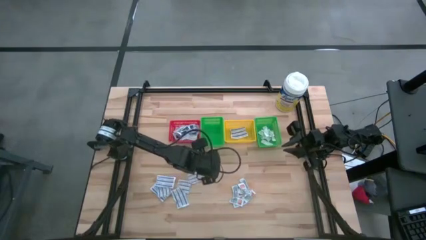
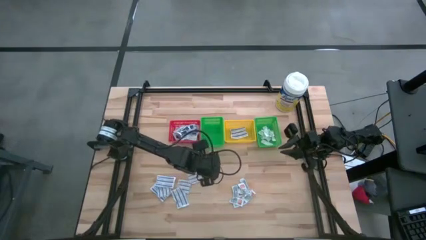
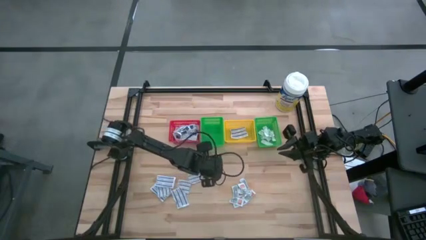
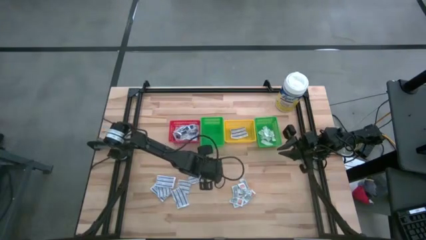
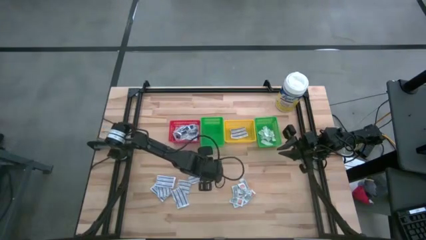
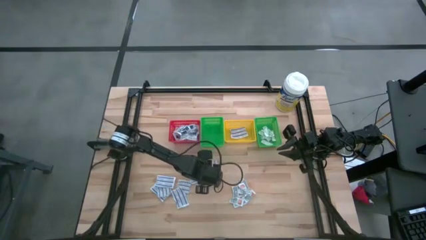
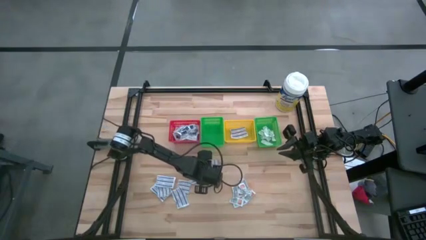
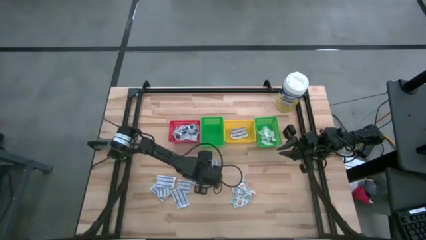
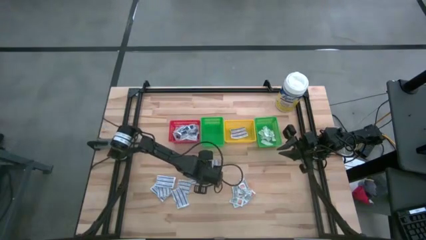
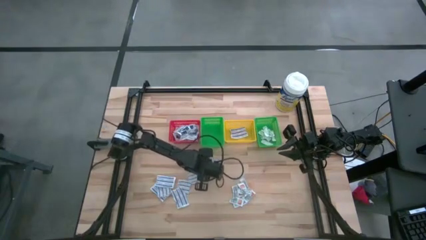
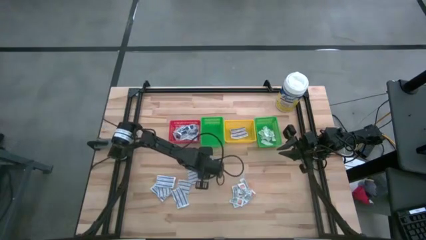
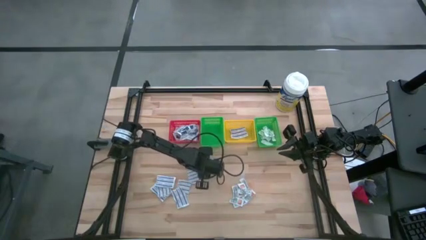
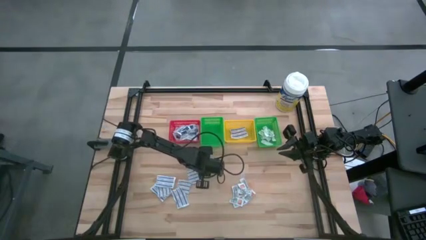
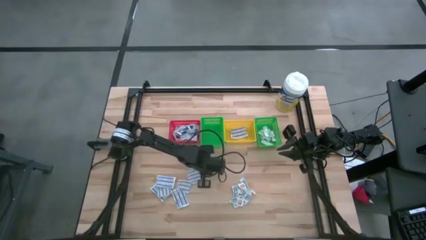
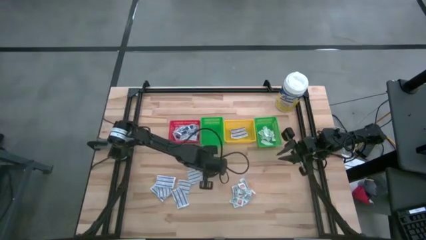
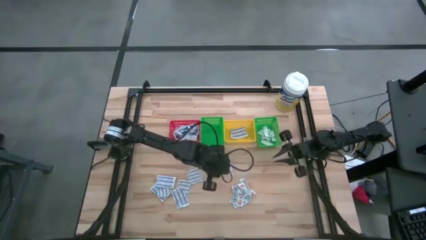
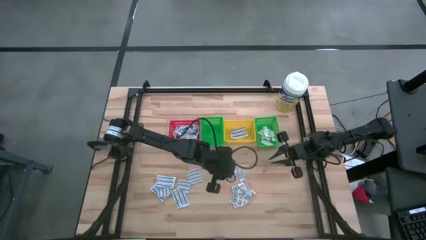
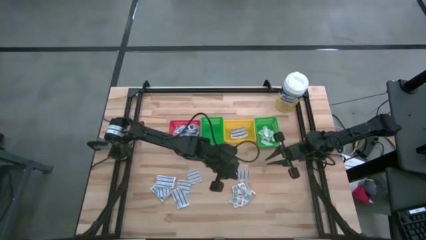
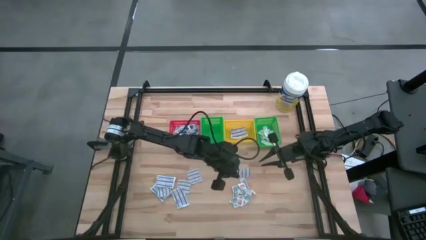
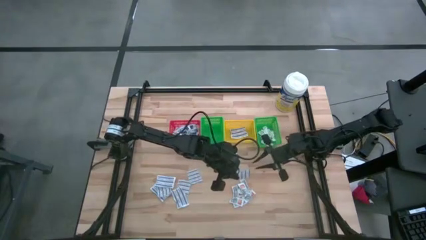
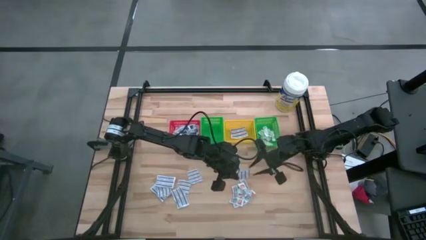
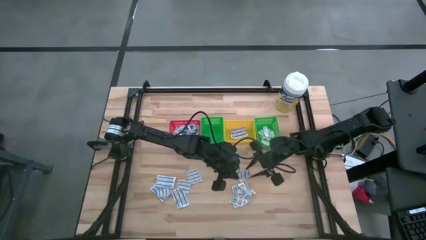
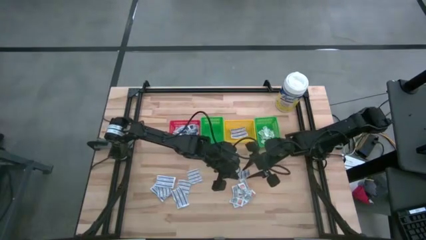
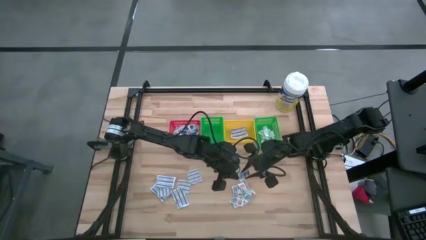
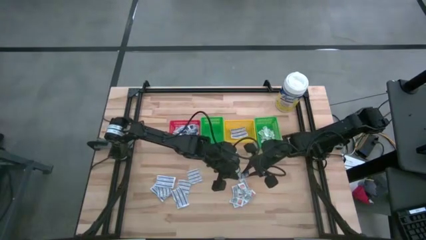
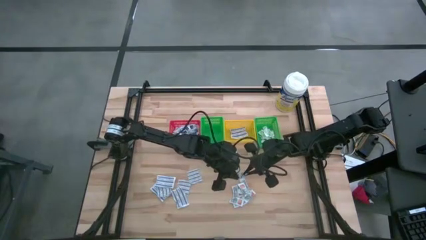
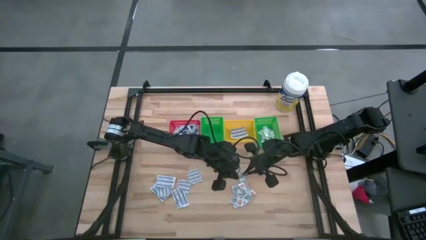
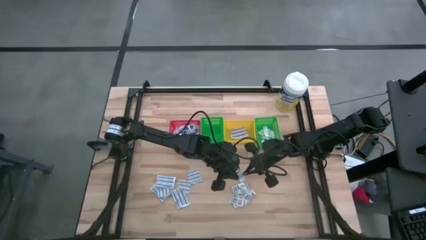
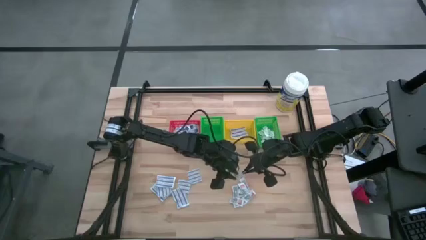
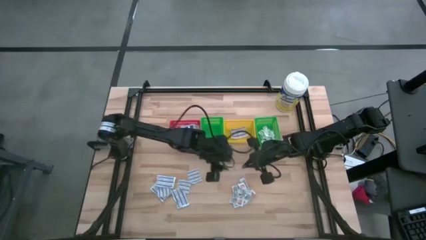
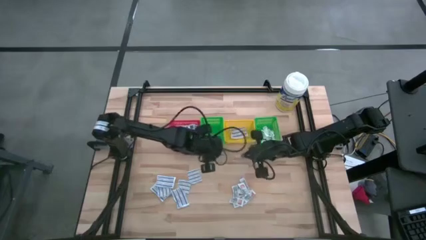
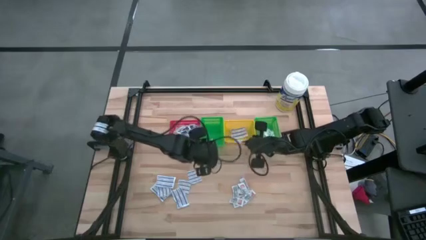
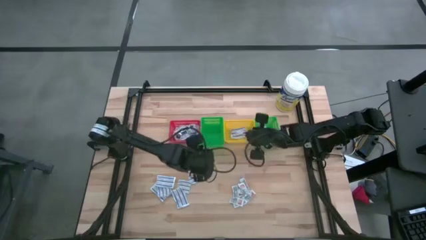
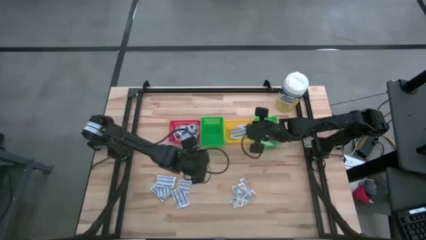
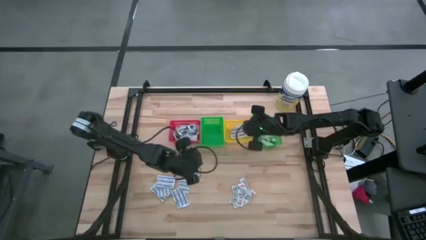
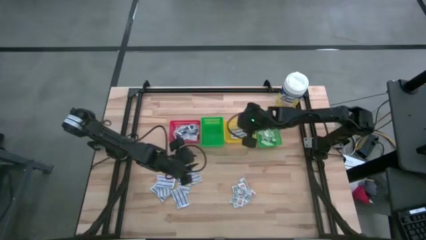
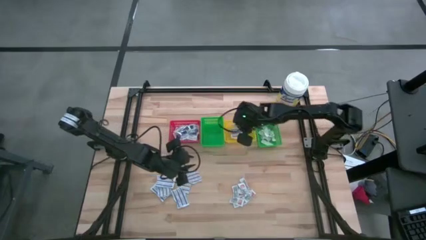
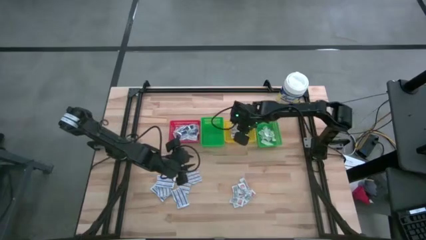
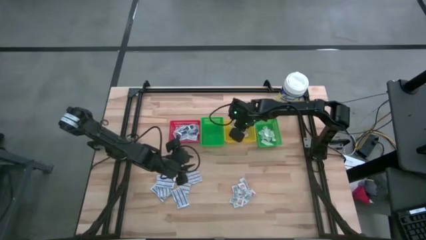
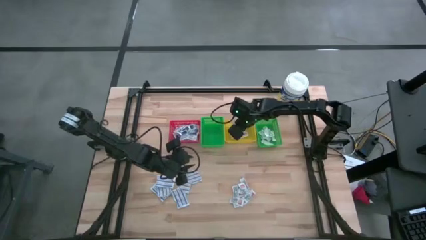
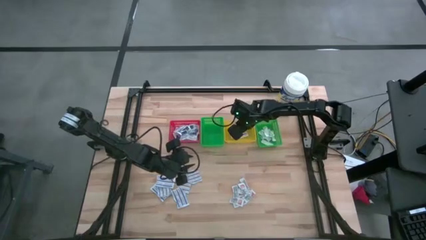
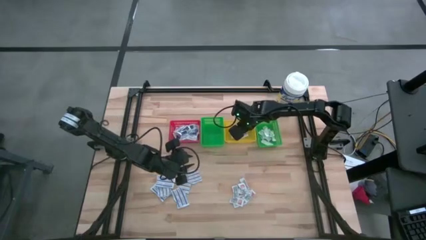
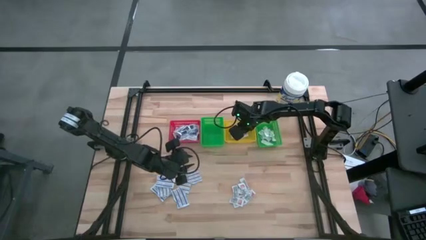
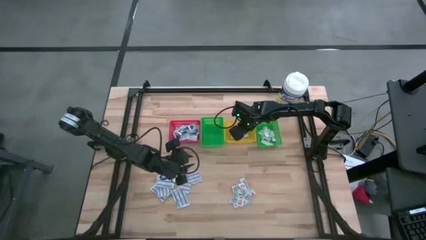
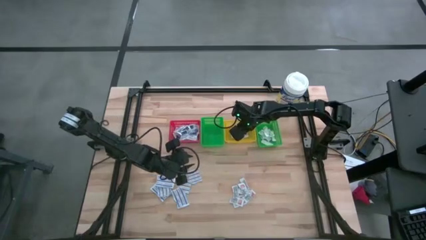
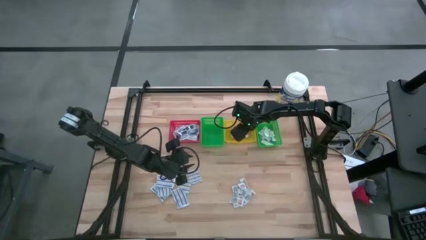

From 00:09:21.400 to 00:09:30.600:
Task: Pick & Place First Aid Supplies
Put the blue bandage into the yellow basket

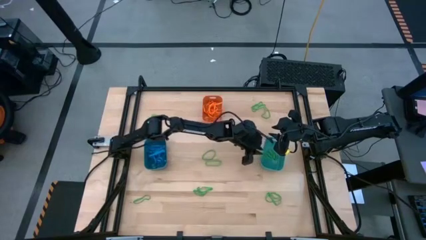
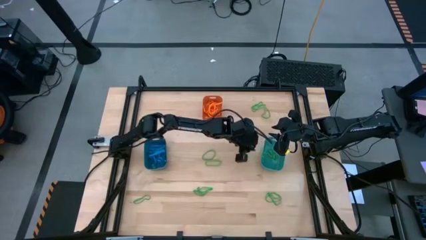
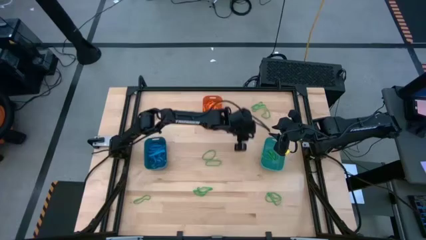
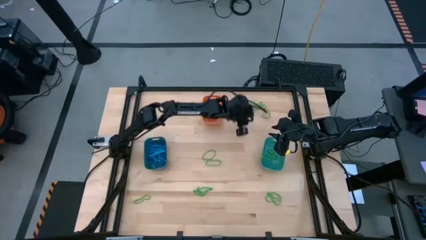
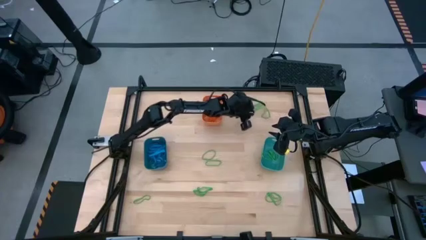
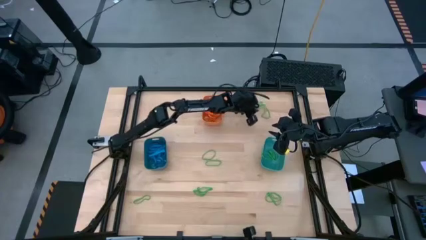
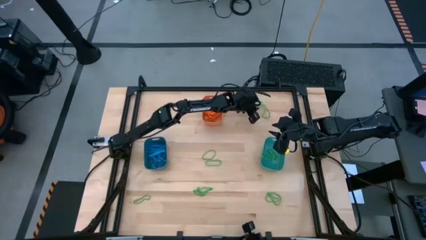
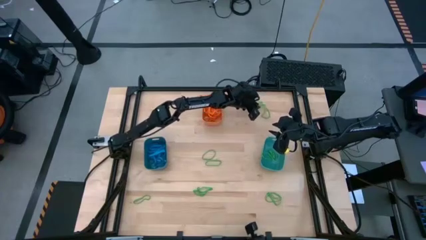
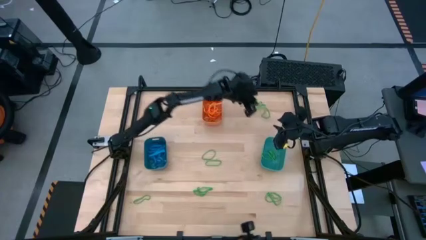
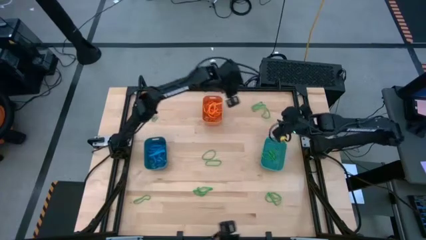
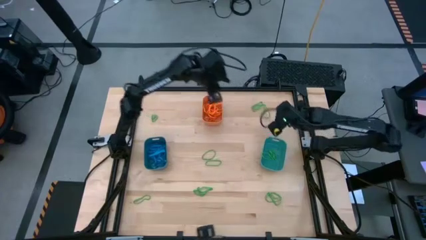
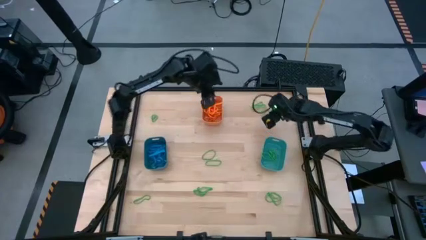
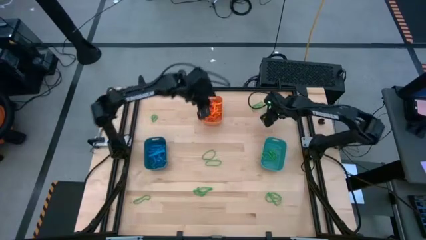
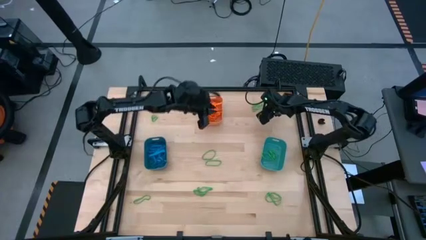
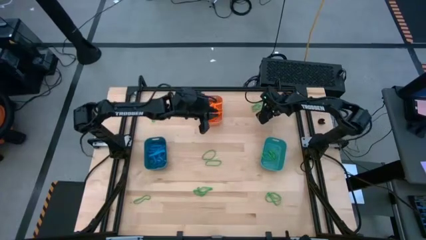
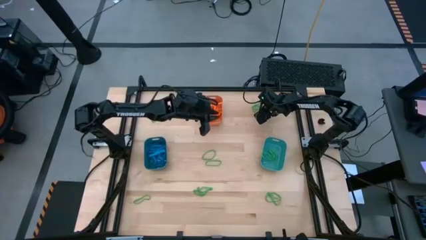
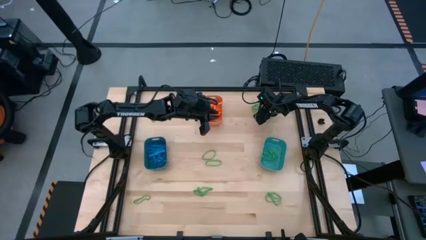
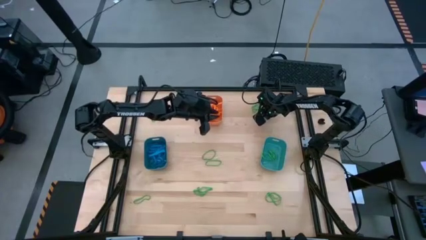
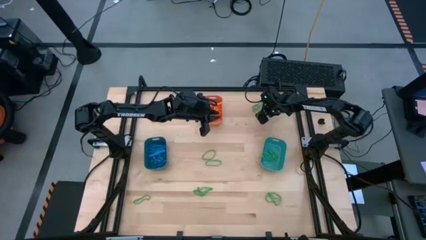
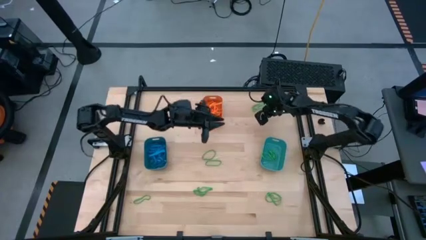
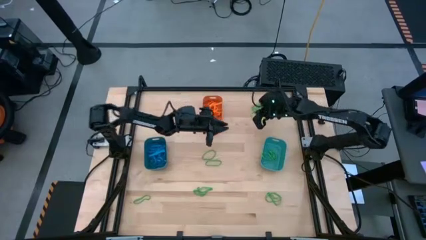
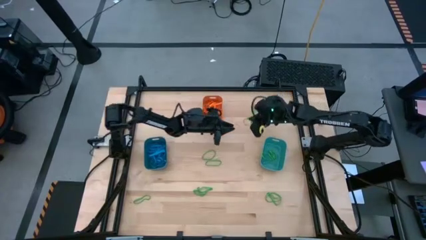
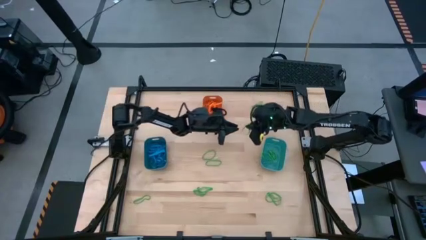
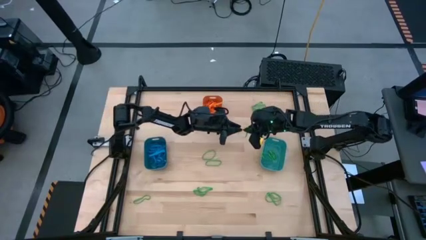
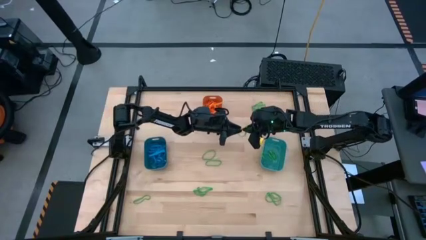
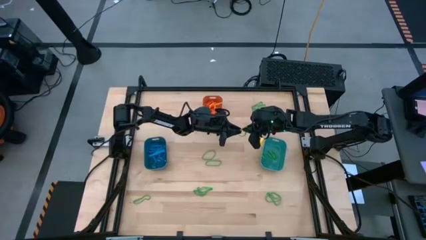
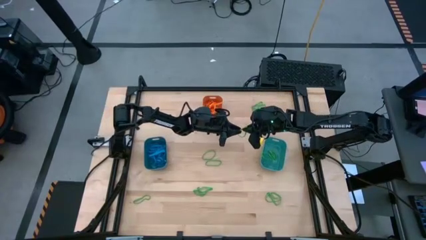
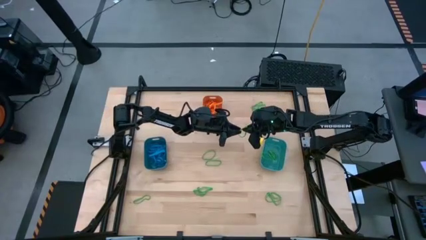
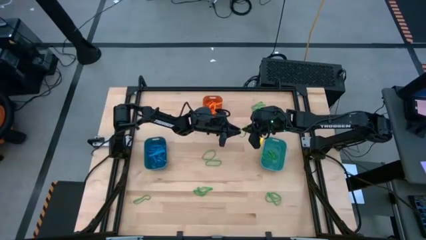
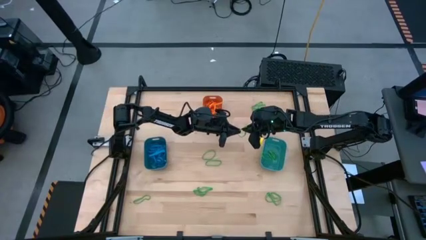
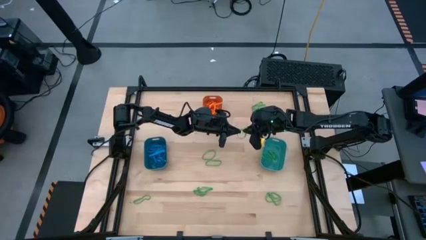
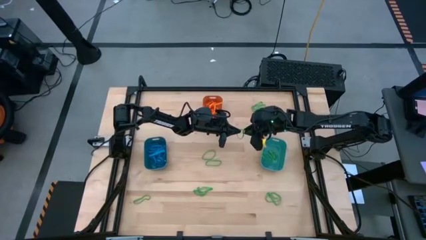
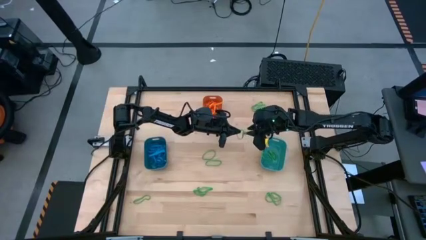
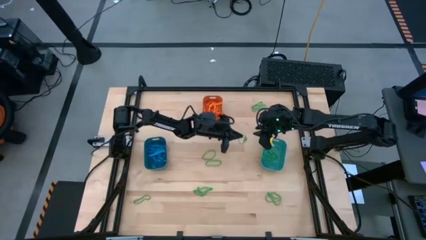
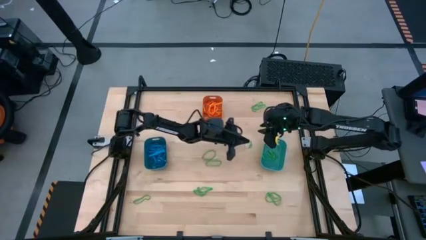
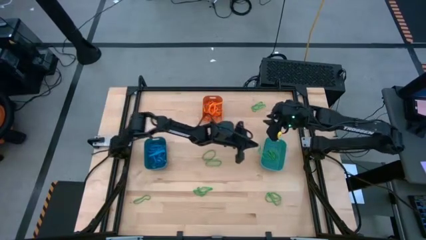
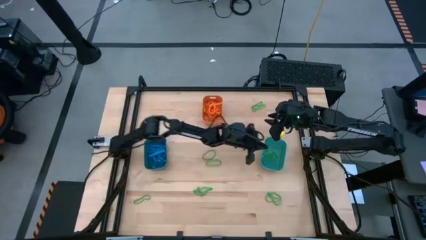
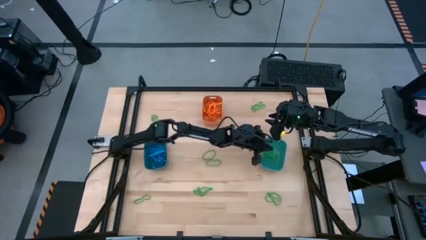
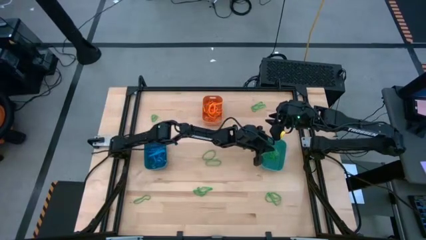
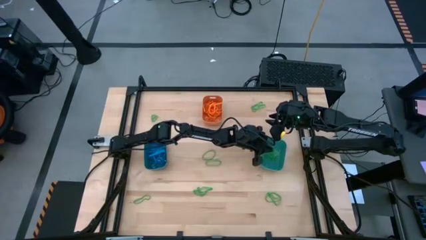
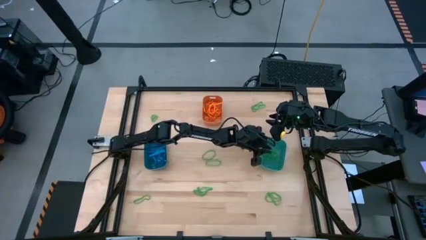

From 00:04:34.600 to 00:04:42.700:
Task: Sort rubber bands into baskets
Put the green rubber band into the green bin
